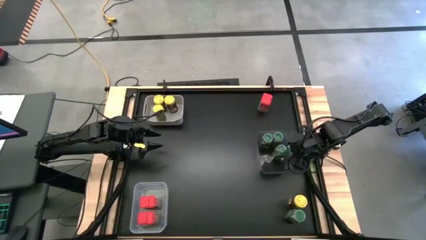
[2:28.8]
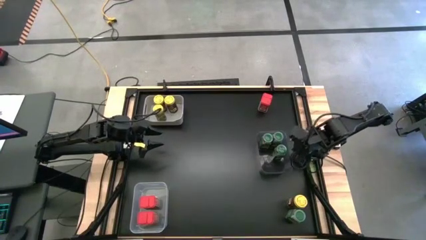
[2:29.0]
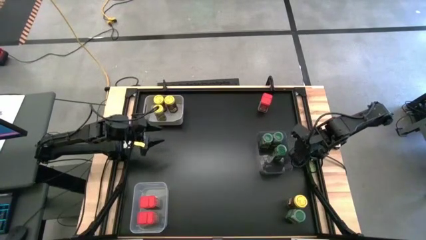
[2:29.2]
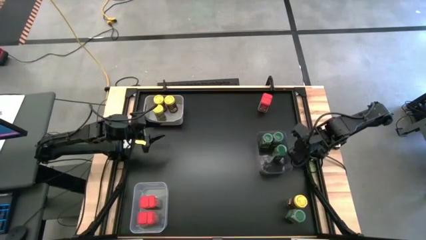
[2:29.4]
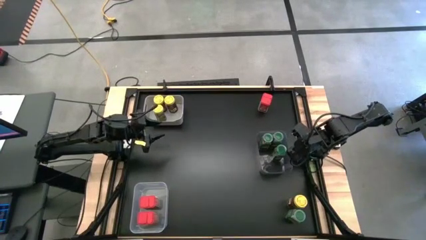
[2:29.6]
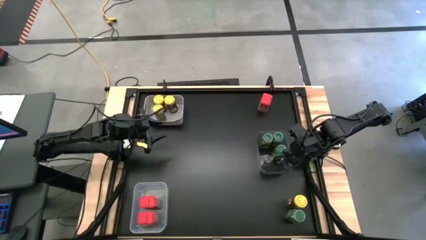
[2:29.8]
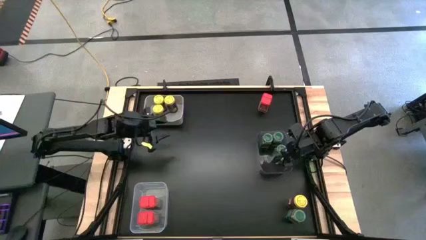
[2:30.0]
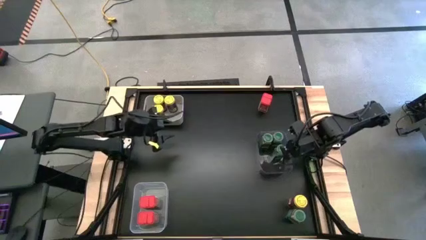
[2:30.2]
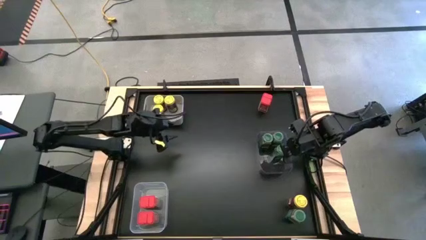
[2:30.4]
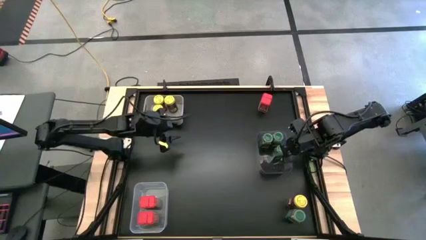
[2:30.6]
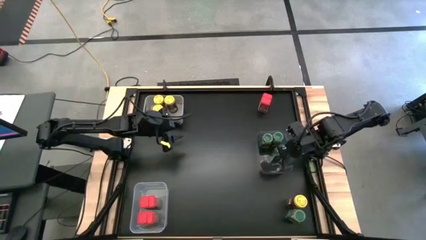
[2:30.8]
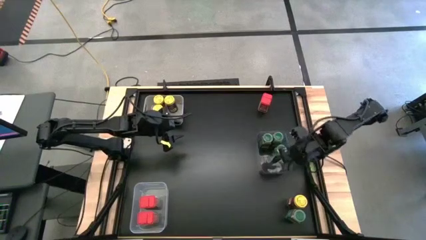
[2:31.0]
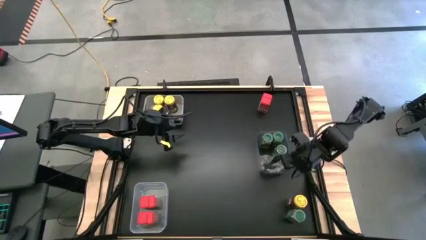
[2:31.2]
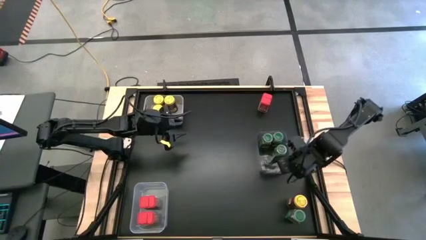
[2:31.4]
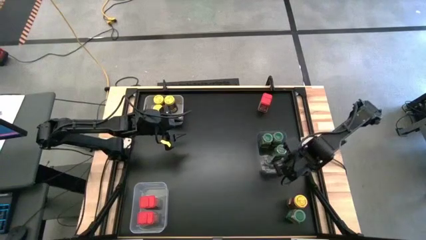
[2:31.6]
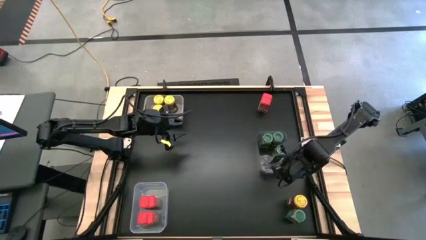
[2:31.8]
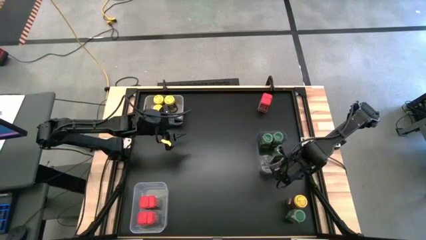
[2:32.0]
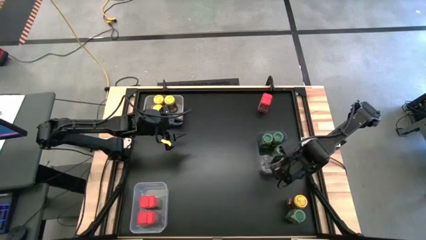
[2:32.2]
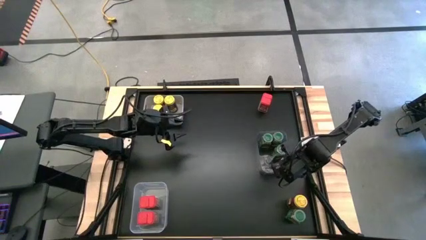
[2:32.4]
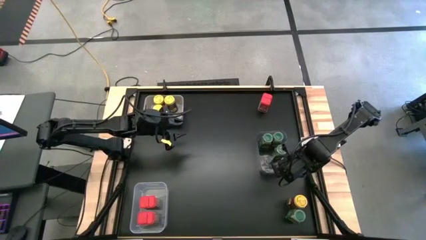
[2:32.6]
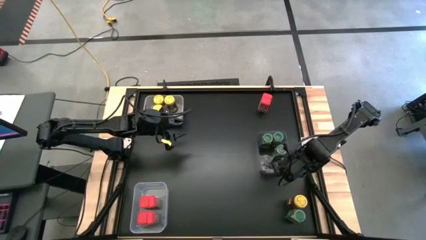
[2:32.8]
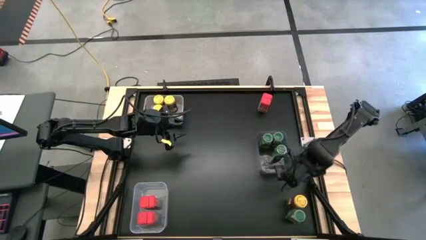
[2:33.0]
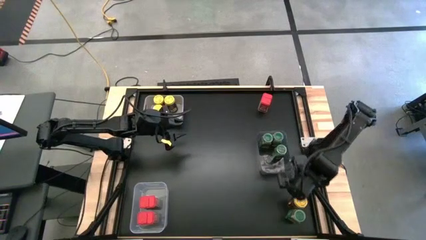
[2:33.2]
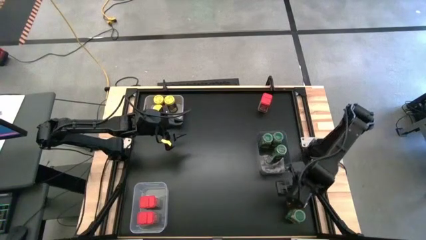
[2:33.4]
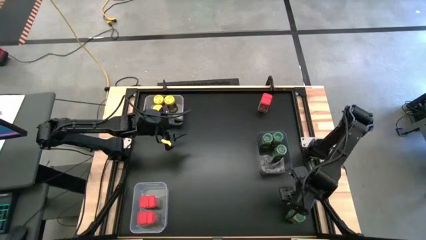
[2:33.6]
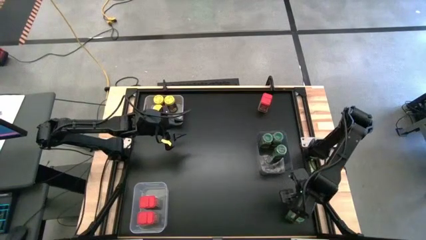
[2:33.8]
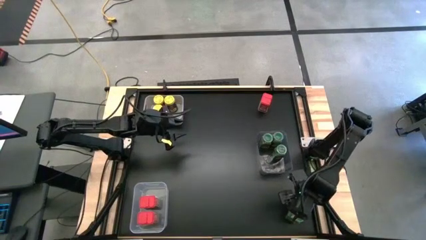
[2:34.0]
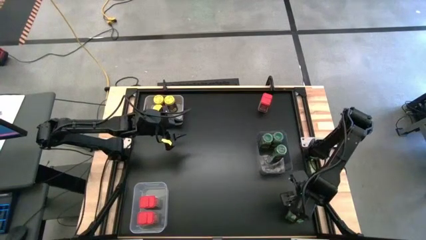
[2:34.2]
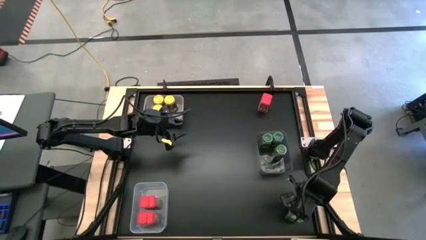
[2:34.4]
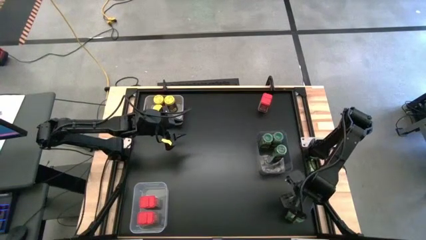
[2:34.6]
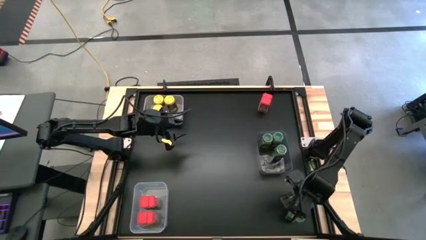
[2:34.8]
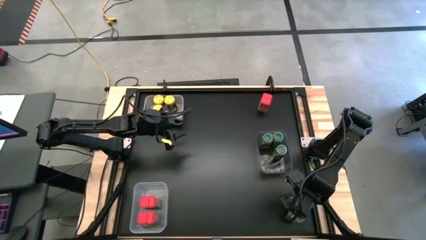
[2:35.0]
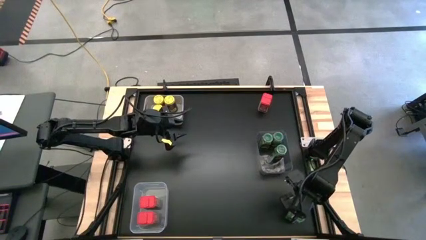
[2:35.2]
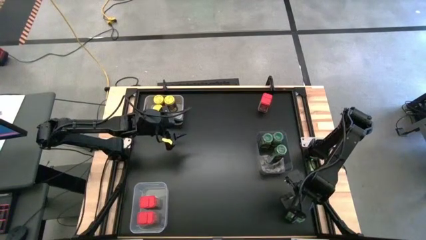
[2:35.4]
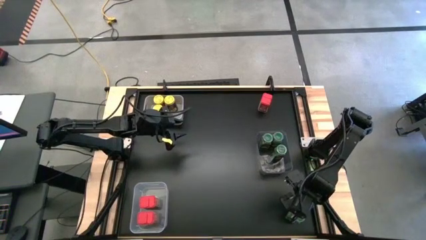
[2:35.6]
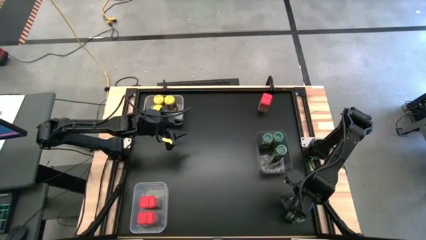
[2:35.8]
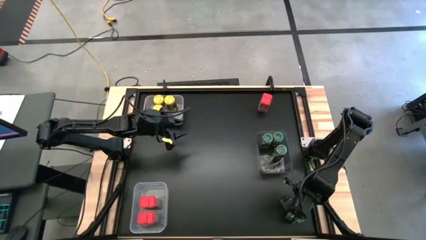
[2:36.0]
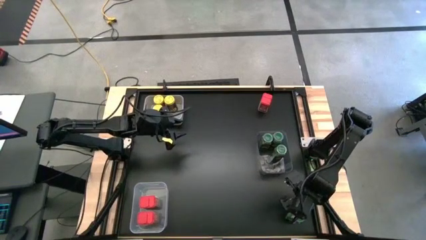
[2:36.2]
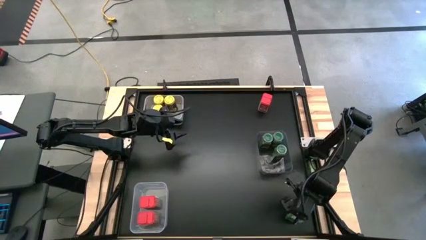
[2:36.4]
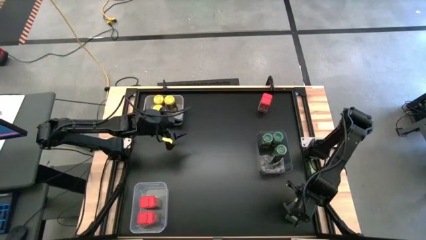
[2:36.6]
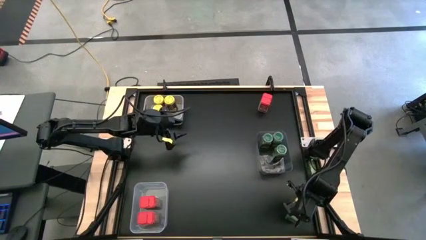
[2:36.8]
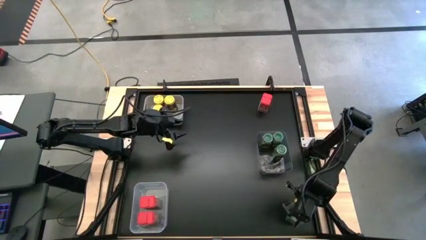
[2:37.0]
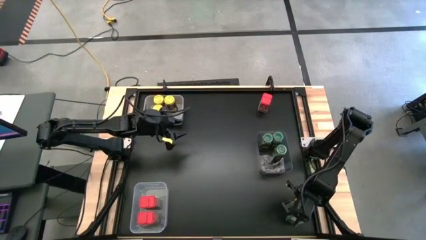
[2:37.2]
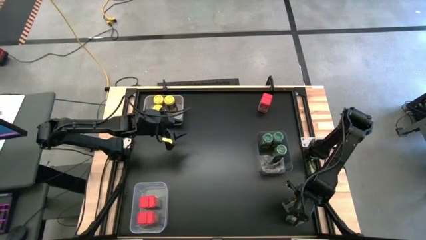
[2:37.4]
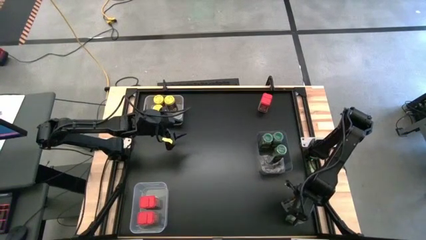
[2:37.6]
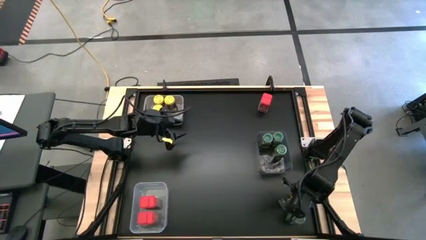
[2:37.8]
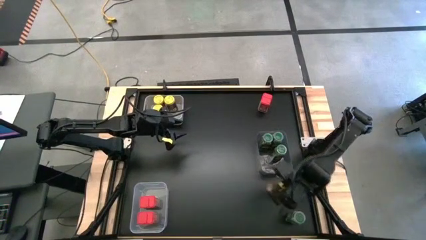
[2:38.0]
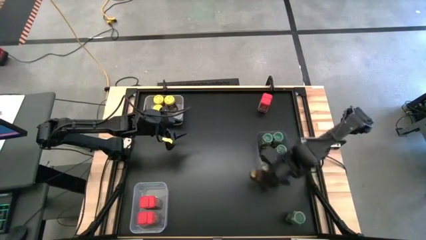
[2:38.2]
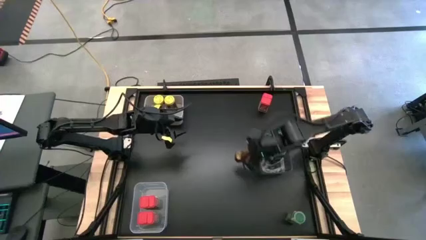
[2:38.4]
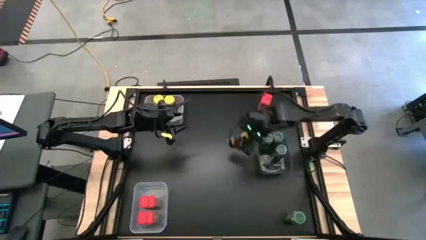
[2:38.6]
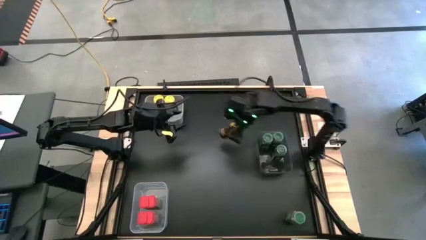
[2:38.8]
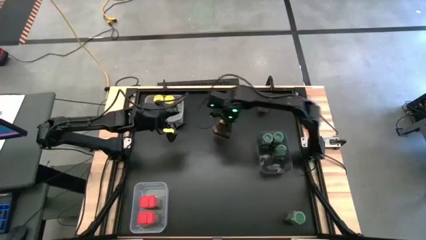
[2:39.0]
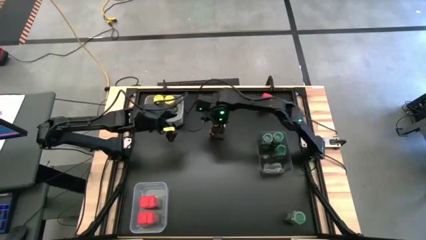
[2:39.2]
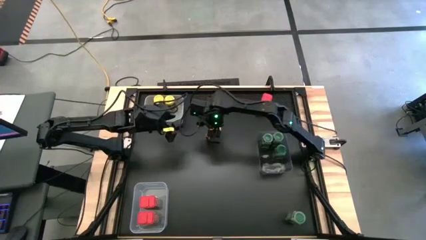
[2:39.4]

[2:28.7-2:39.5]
Task: Sort spices by type
Put the yellow seasoning bottle into the gray bin

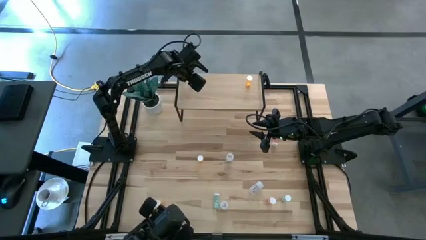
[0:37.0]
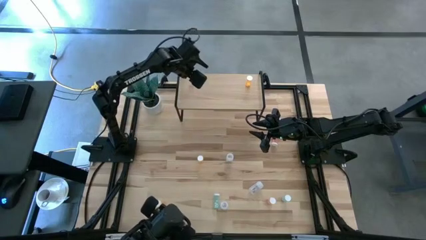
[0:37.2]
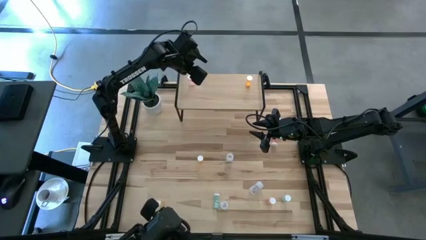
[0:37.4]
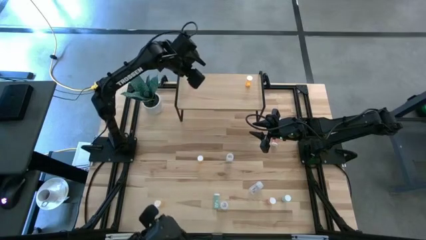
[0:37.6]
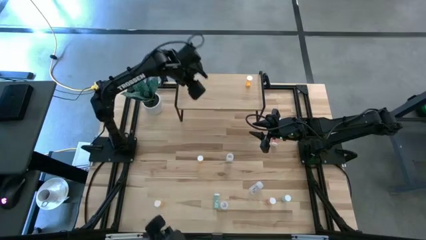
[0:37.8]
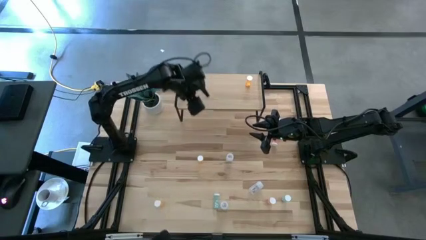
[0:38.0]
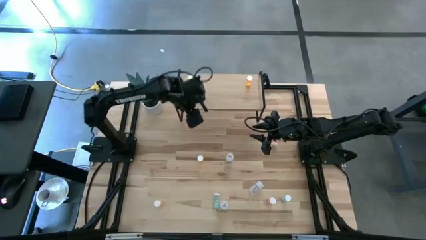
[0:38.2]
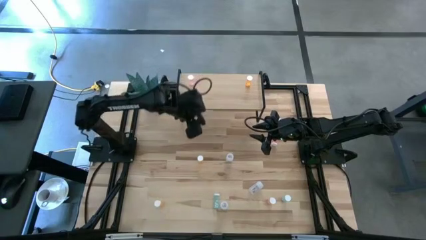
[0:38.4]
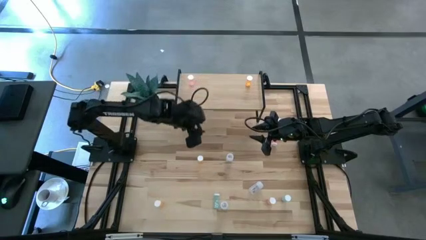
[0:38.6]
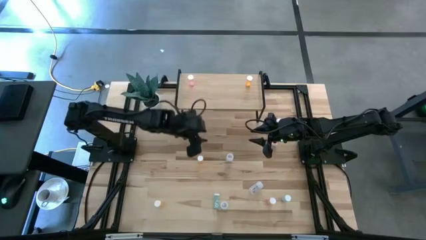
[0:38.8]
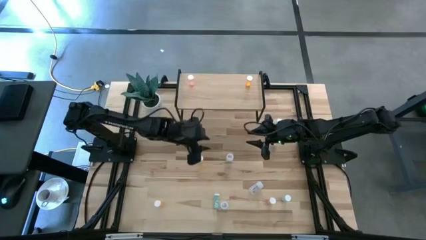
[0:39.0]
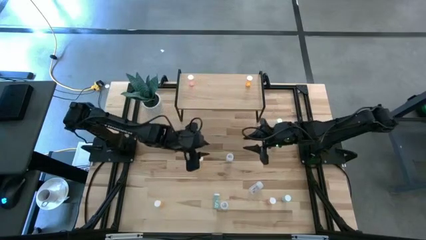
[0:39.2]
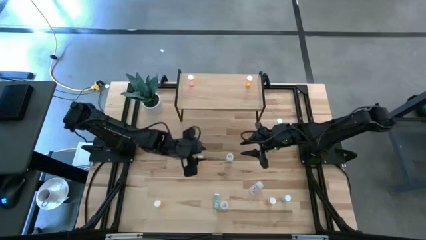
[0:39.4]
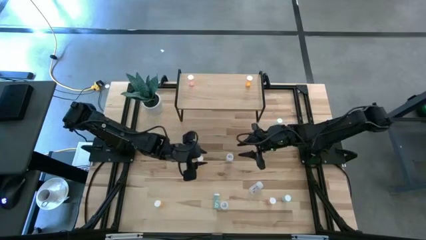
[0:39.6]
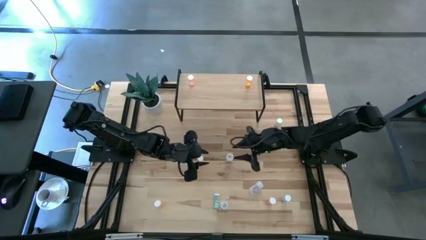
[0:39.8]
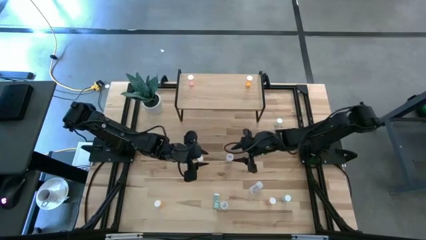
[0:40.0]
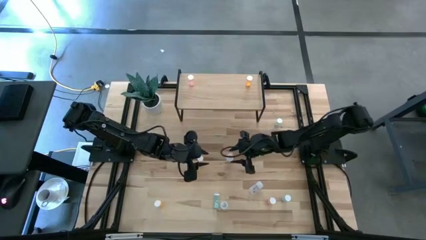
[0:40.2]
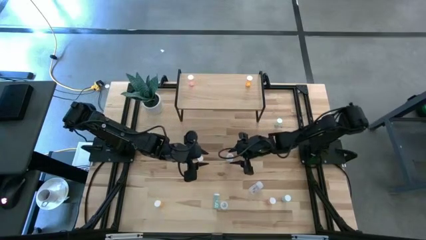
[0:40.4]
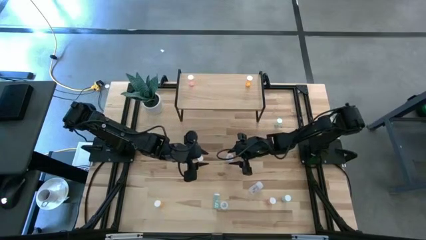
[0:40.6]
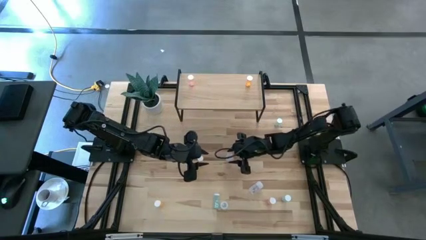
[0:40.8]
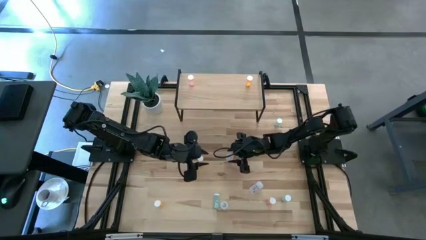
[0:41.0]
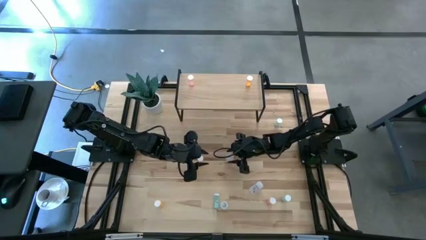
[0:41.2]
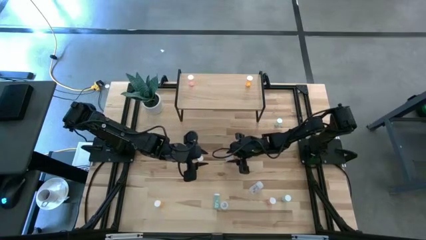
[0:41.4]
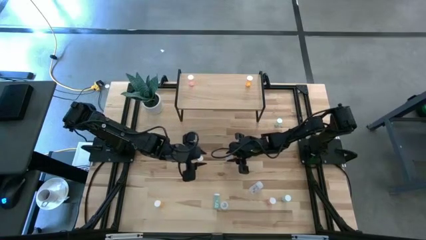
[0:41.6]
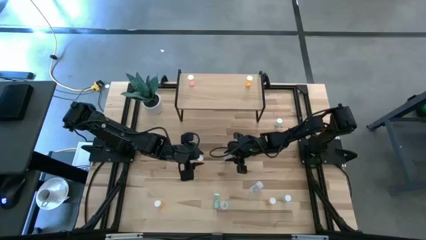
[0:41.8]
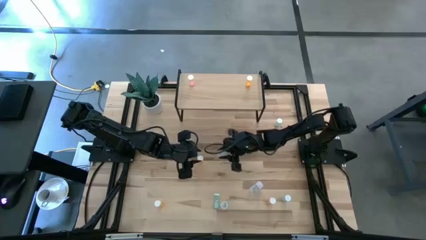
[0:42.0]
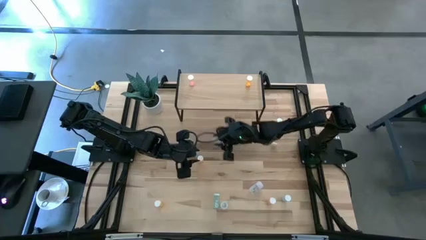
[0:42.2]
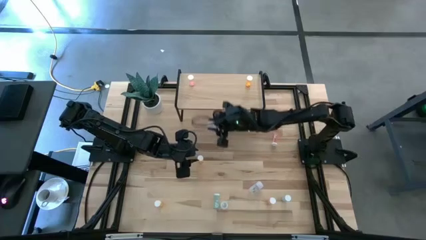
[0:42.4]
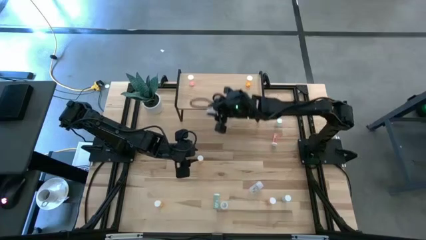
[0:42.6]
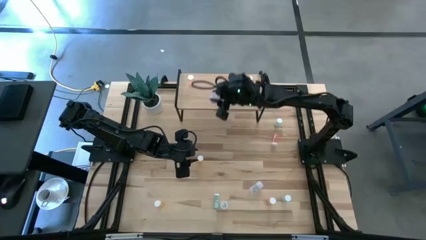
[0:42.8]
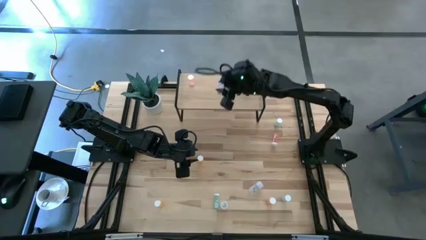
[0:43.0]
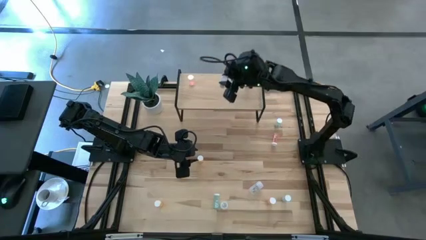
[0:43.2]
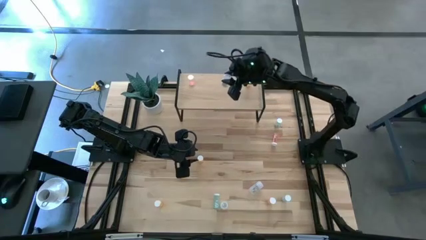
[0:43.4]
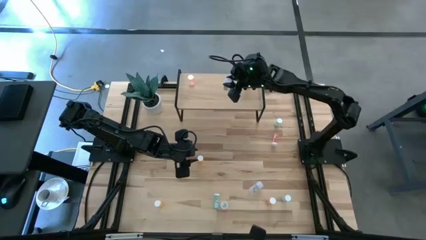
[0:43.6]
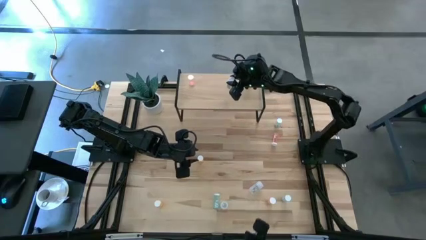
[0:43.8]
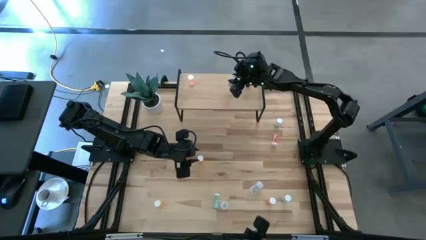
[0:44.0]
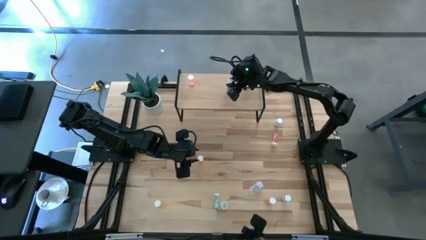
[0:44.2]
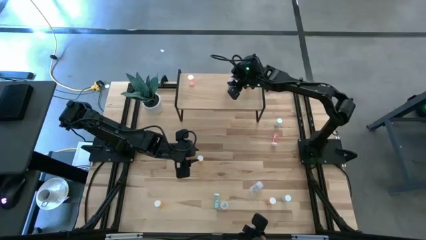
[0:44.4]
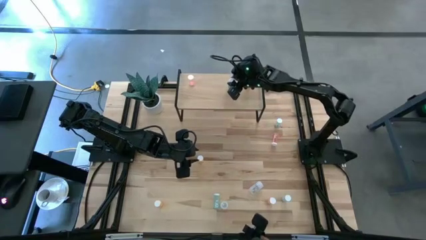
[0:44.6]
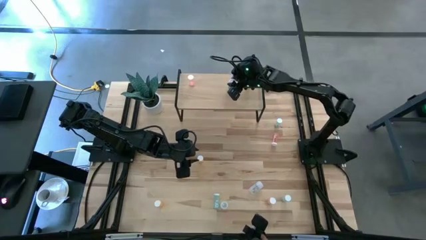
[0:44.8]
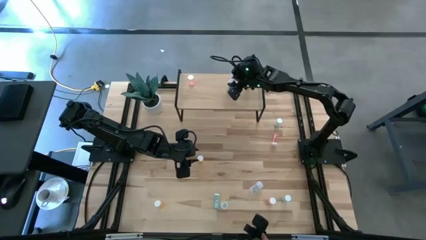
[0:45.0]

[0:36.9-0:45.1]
Task: Pick and place medicine bottles onto shelf by color
Put the top transparent pill bottle on the shelf
